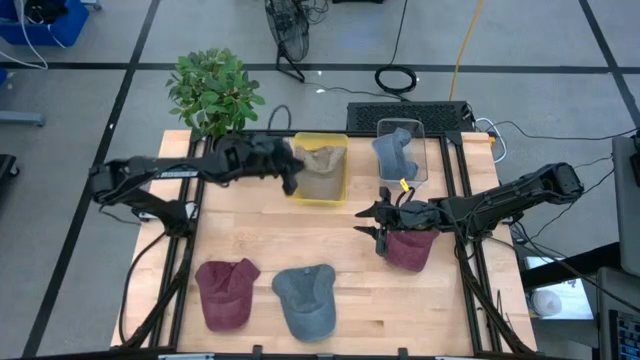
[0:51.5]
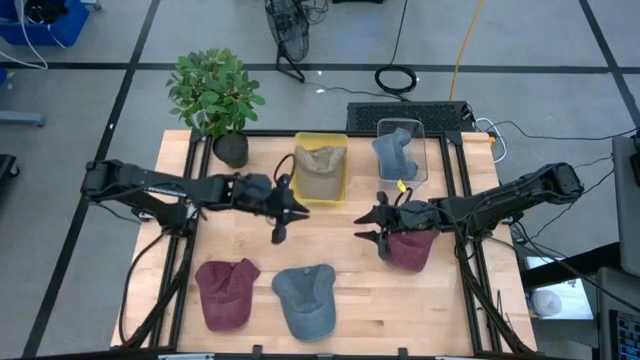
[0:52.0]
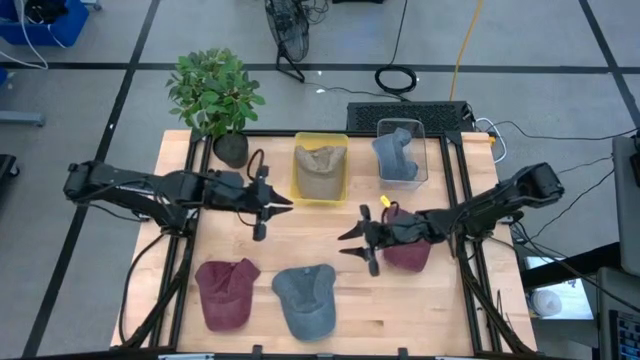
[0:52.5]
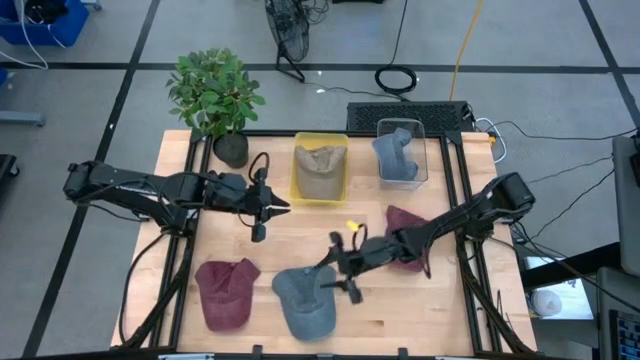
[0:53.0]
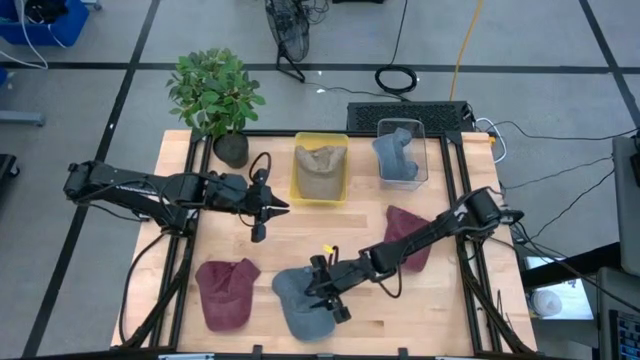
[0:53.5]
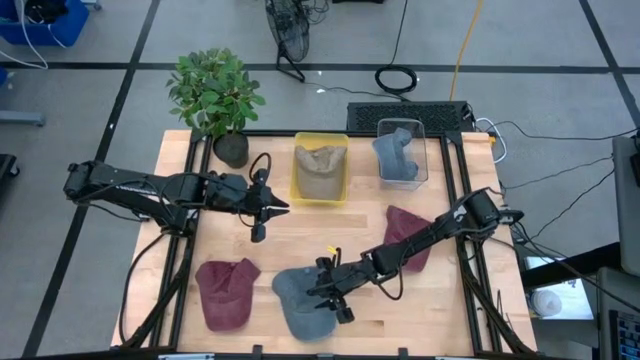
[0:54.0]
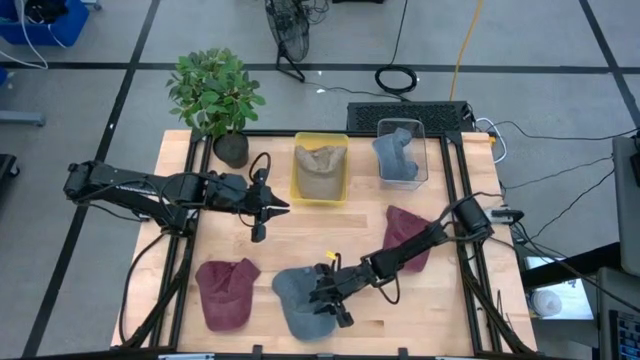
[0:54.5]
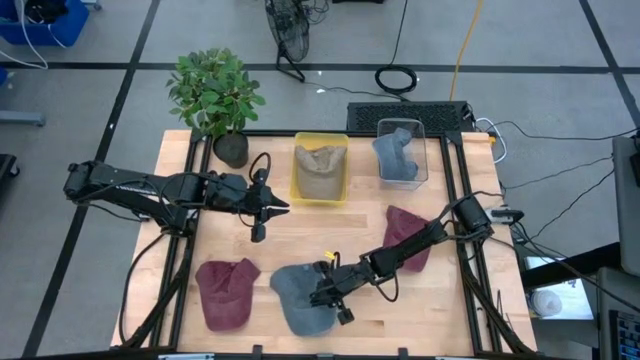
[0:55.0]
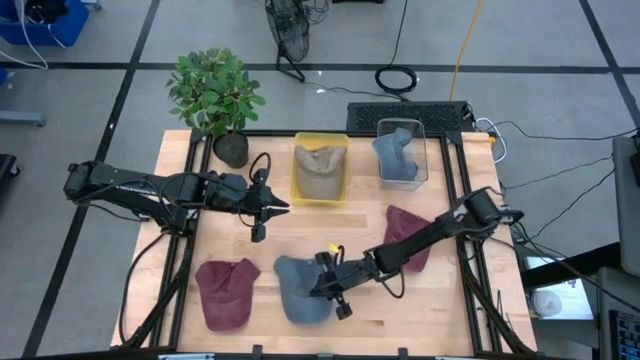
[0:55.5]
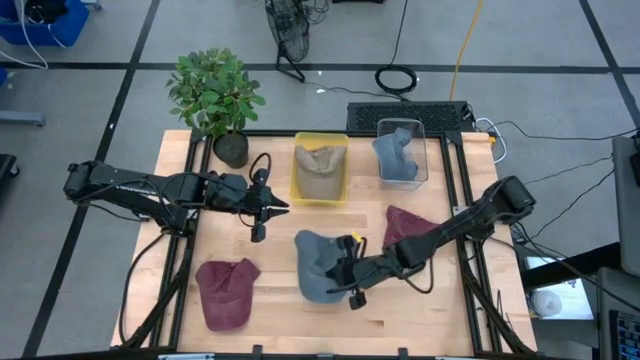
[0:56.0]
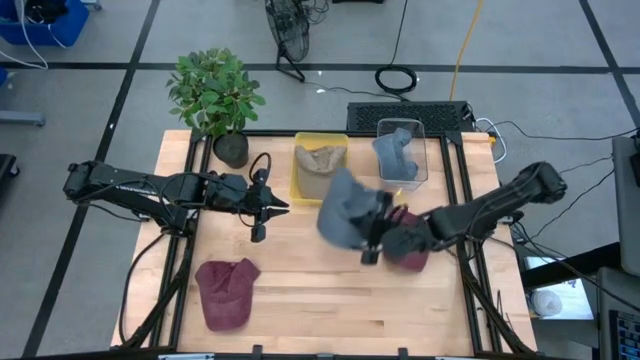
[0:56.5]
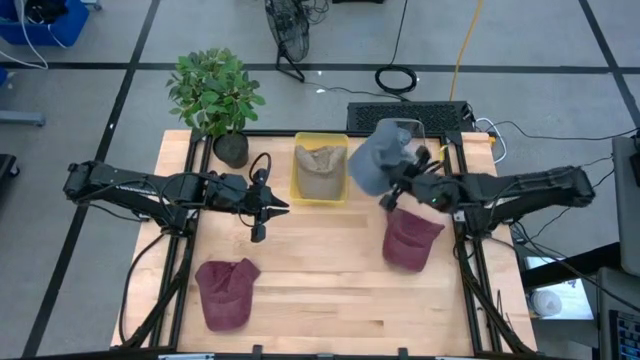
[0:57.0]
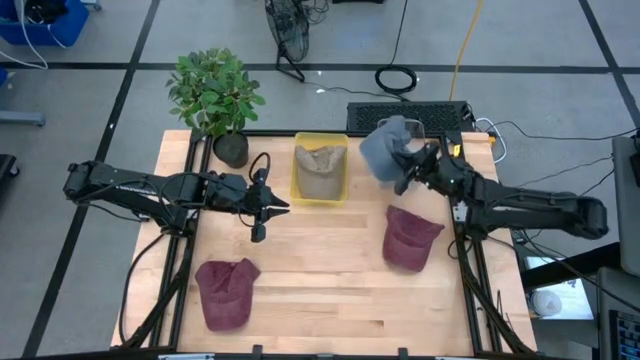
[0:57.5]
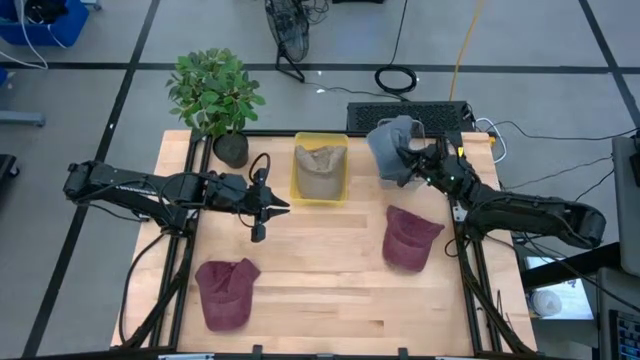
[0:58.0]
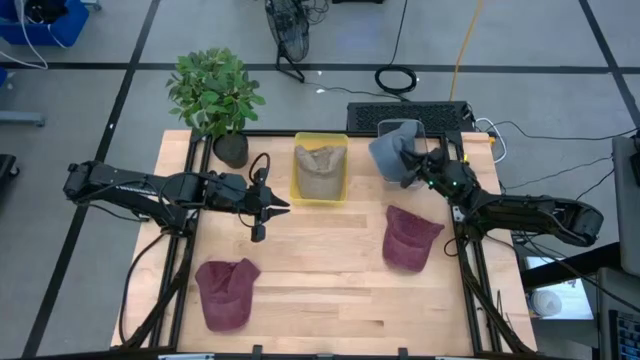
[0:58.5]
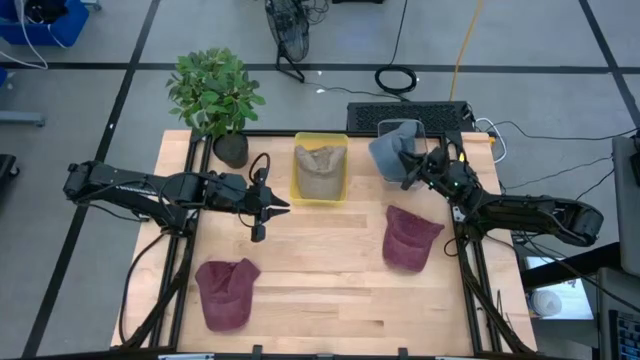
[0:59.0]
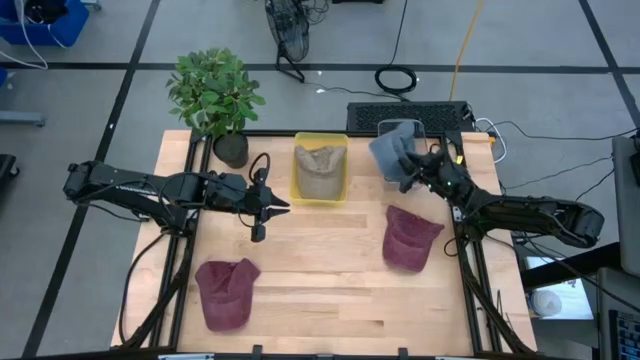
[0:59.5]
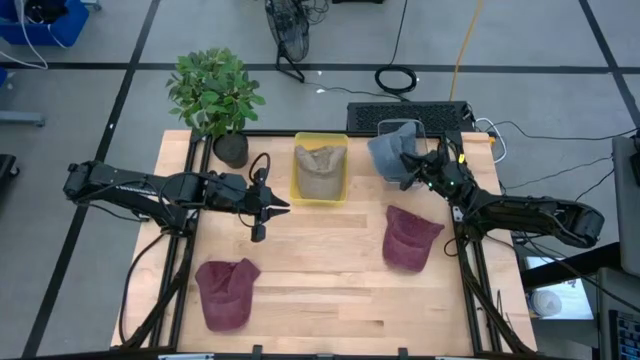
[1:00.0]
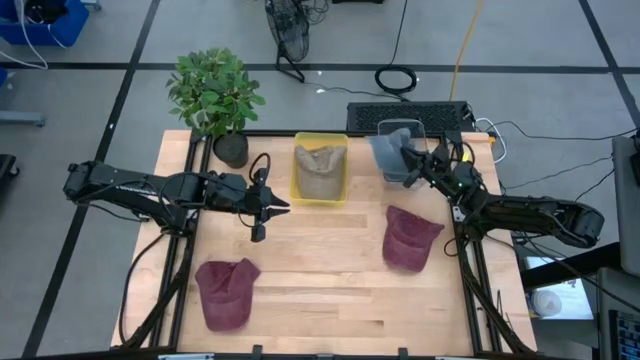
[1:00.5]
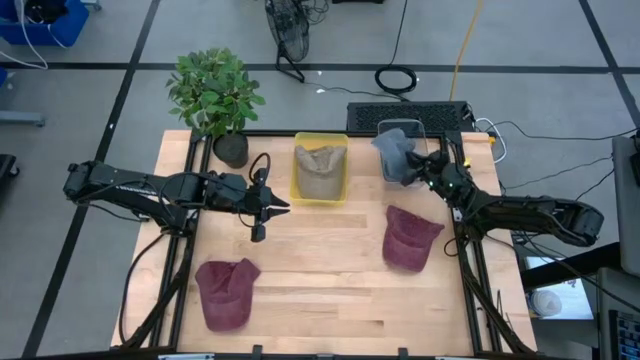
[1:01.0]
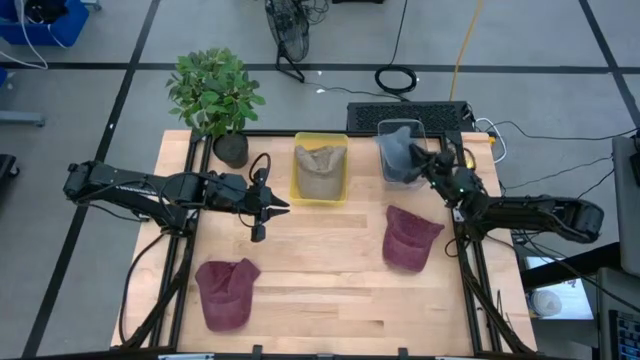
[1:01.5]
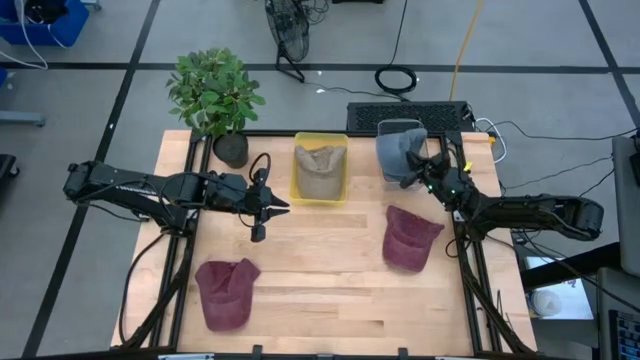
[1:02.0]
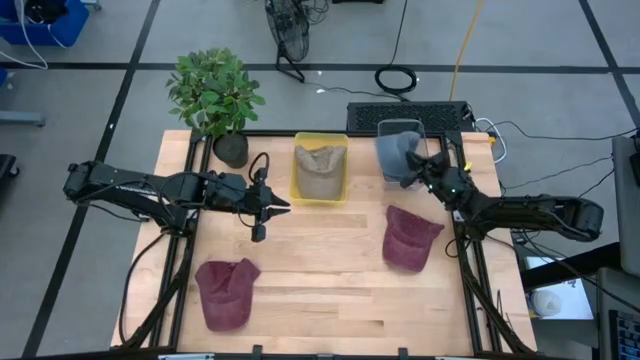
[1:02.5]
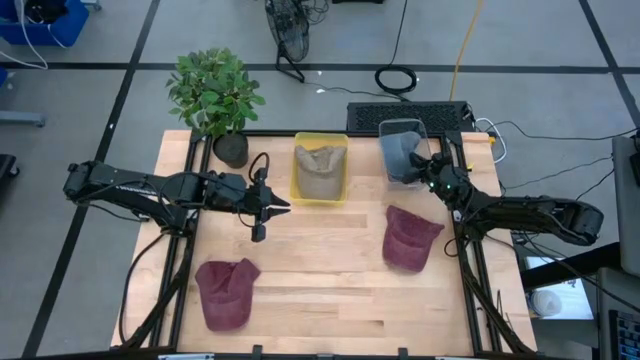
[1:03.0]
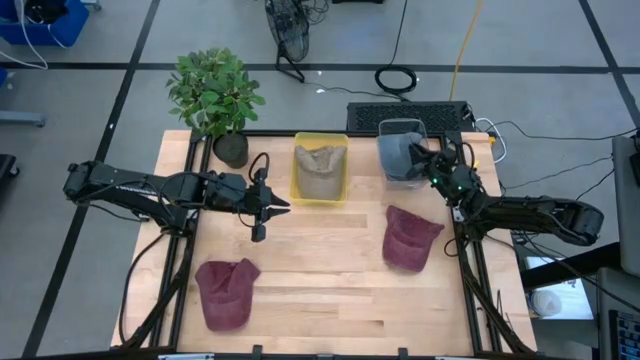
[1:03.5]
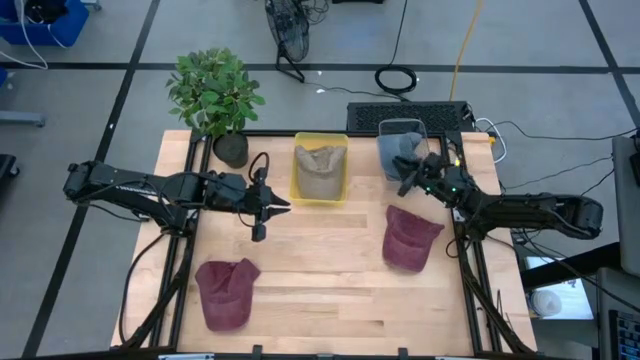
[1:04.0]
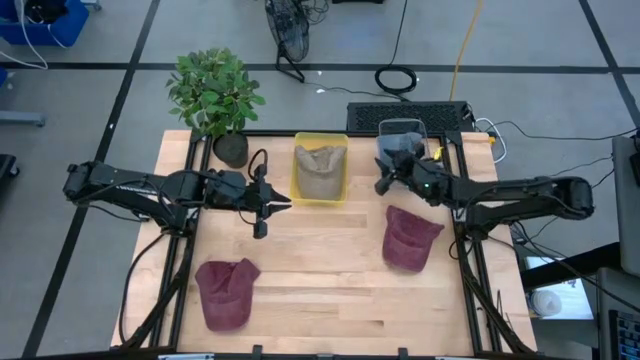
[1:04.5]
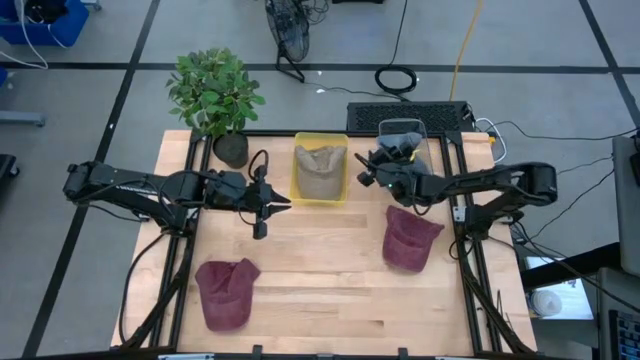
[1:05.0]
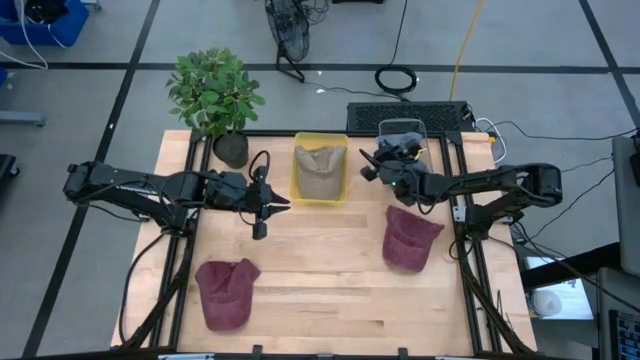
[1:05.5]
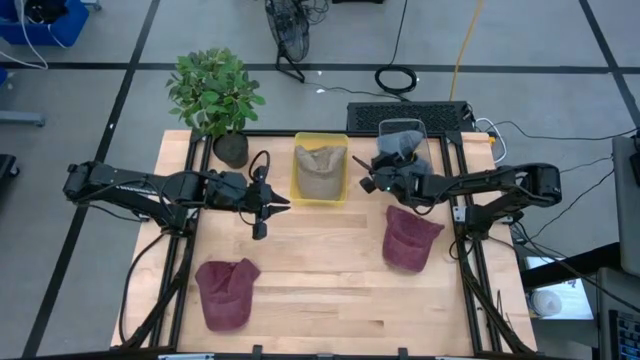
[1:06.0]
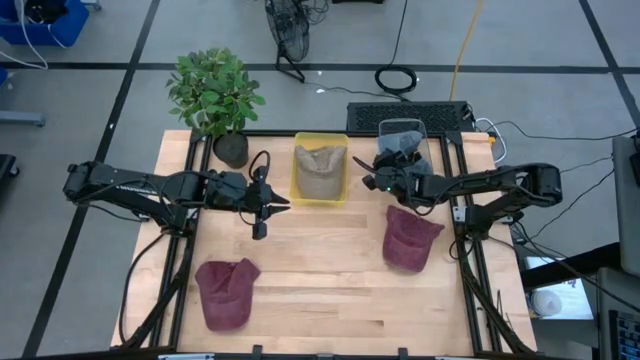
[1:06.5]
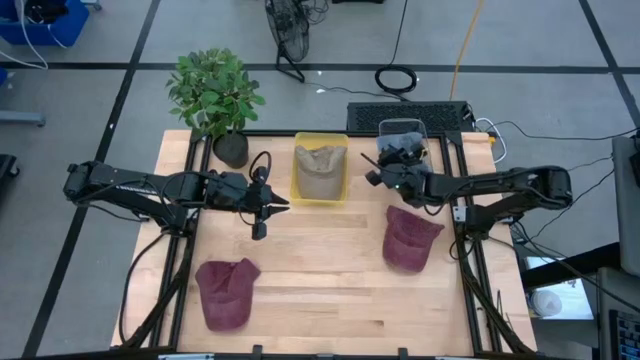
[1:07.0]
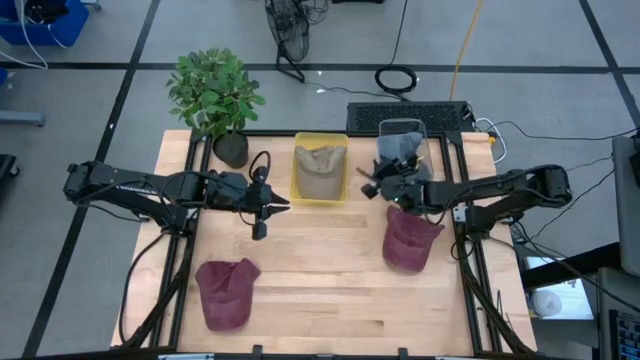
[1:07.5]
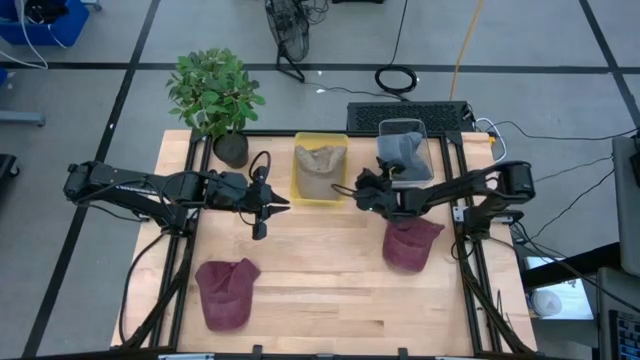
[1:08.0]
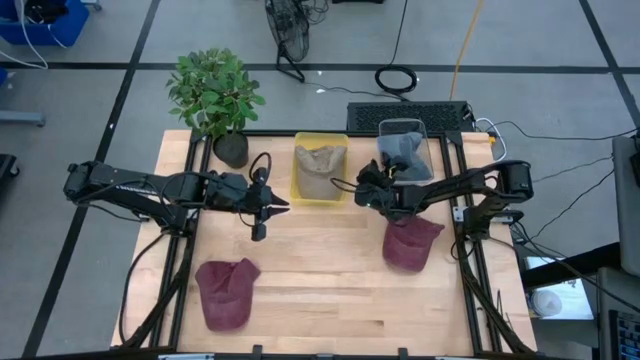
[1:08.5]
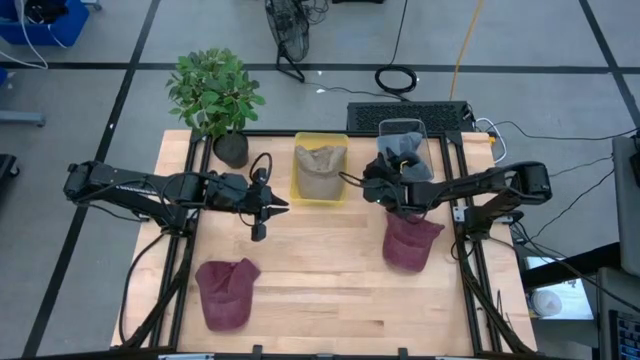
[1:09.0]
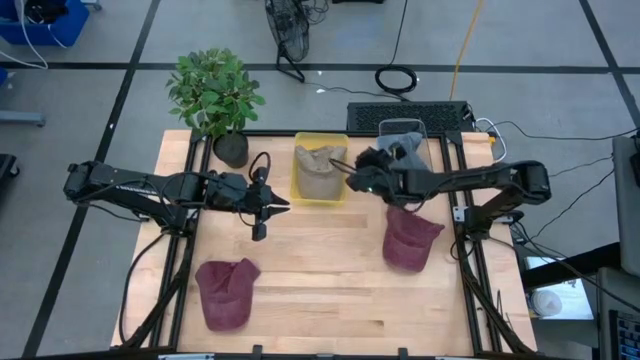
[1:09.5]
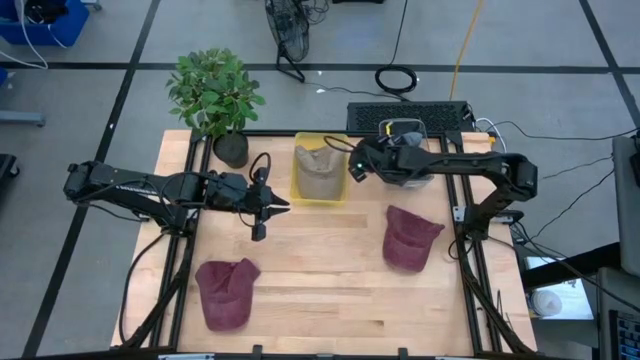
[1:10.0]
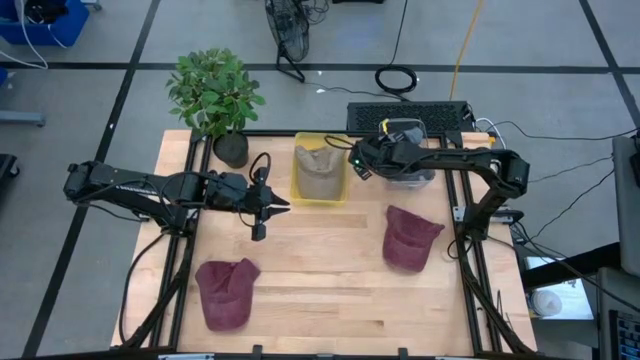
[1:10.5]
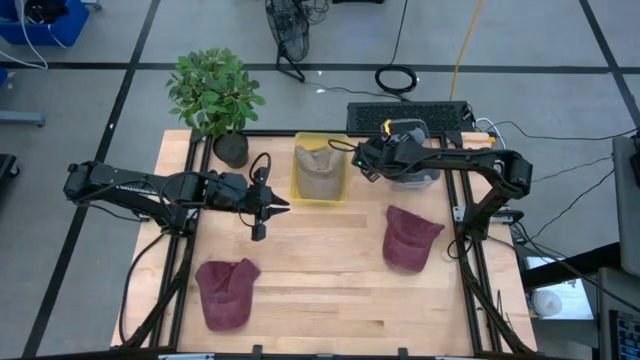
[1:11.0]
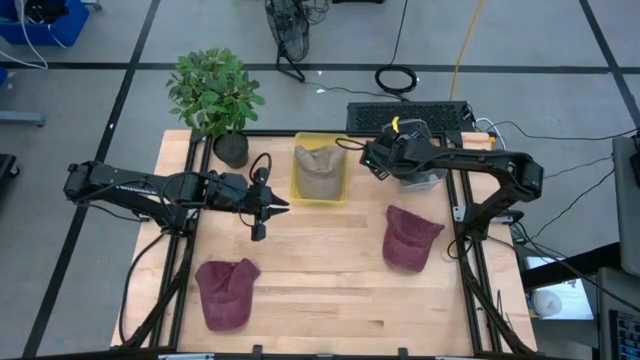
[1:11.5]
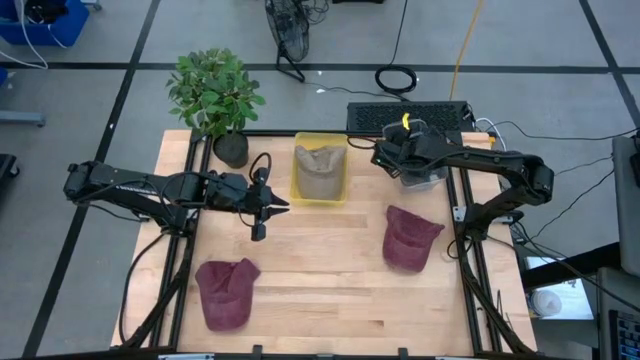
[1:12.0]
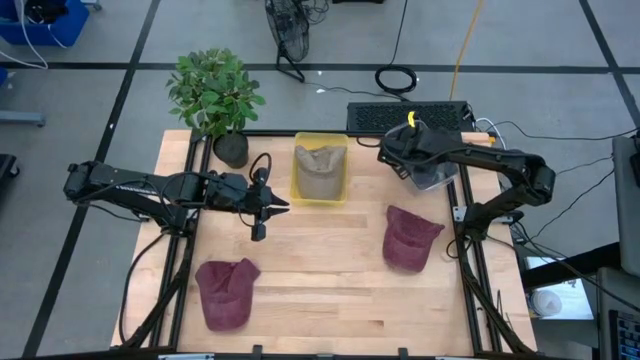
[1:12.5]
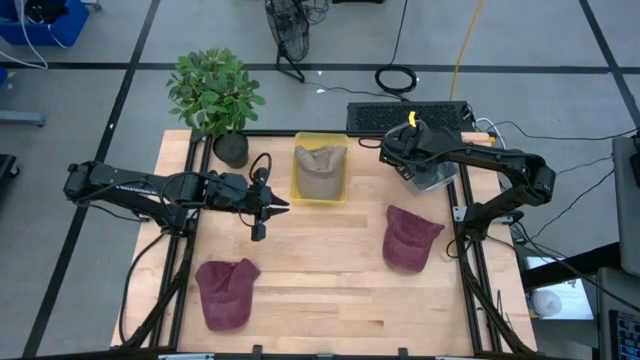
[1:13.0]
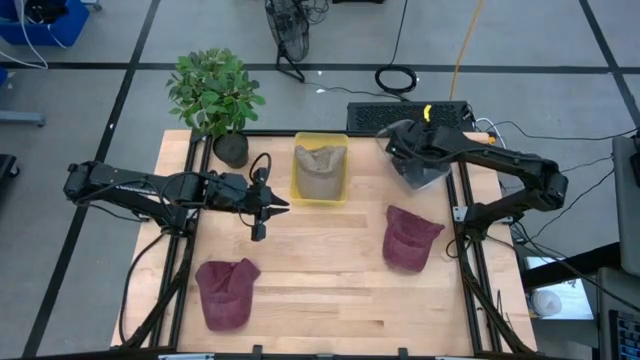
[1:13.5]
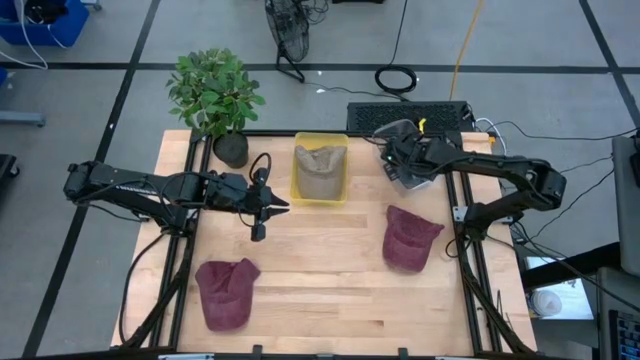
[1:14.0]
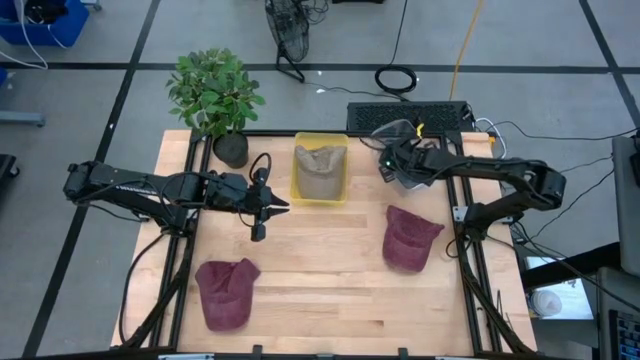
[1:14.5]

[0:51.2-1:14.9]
Task: Pick & Place hat
Put the blue cap into the transparent bin
